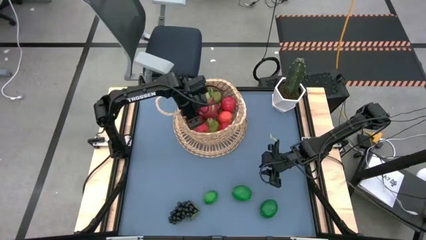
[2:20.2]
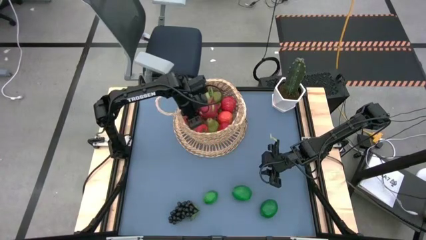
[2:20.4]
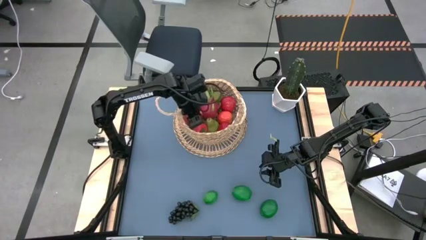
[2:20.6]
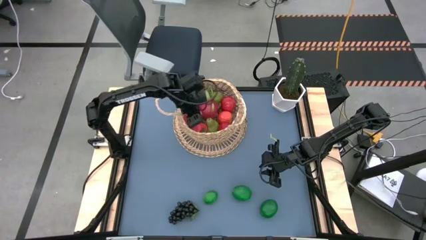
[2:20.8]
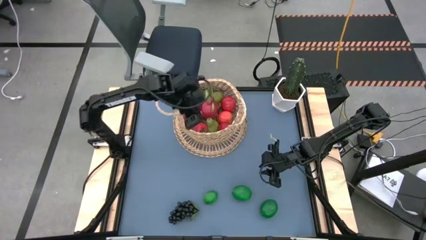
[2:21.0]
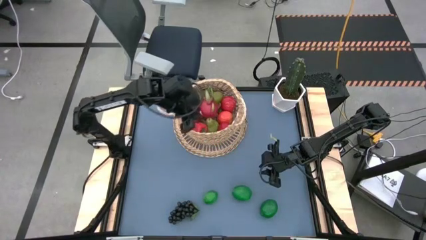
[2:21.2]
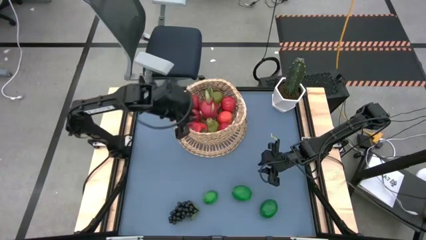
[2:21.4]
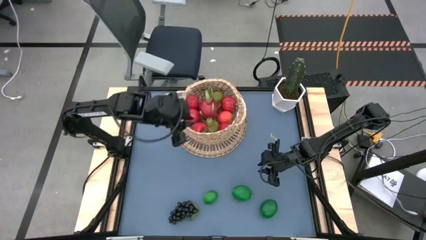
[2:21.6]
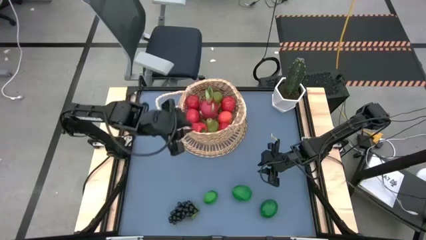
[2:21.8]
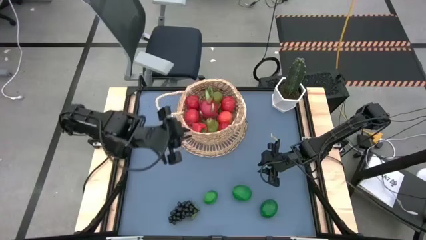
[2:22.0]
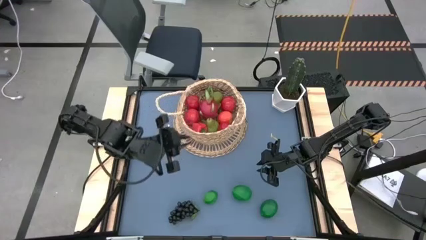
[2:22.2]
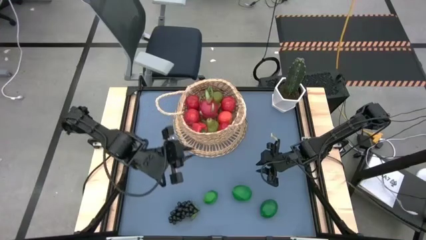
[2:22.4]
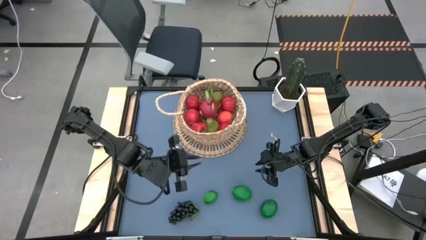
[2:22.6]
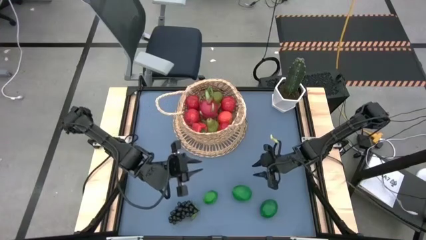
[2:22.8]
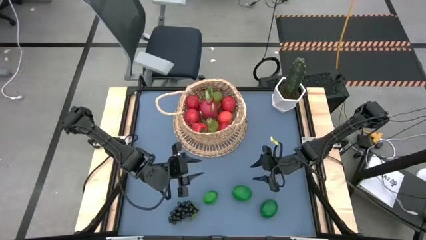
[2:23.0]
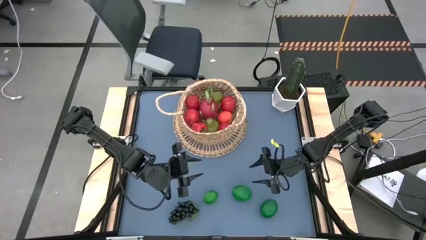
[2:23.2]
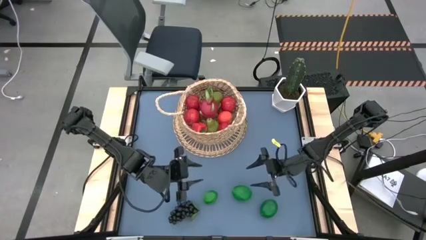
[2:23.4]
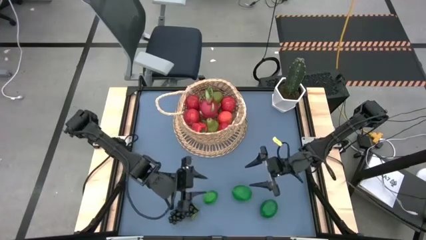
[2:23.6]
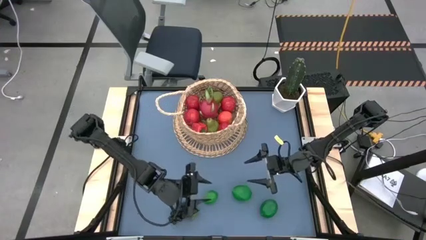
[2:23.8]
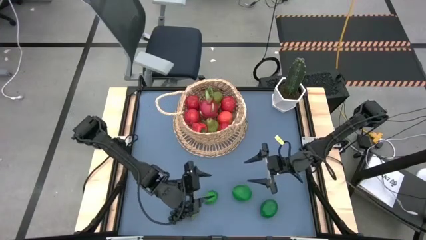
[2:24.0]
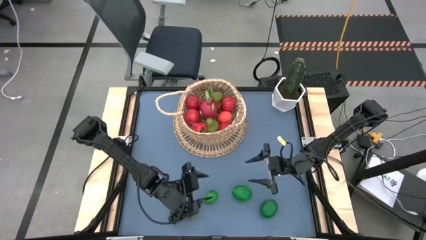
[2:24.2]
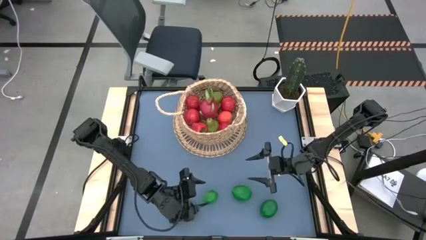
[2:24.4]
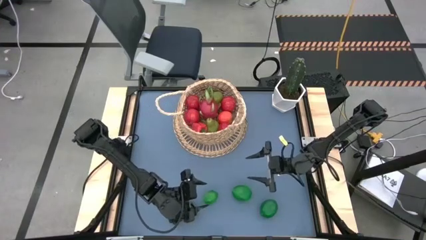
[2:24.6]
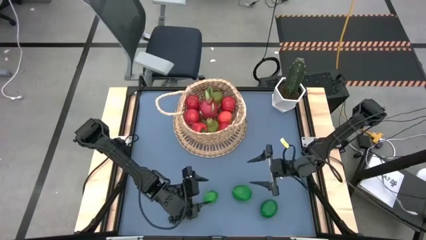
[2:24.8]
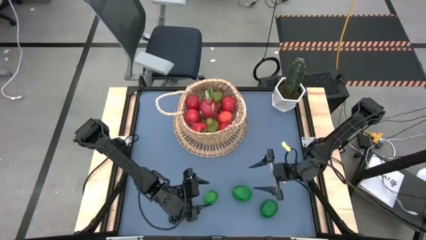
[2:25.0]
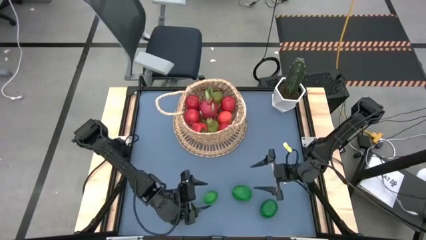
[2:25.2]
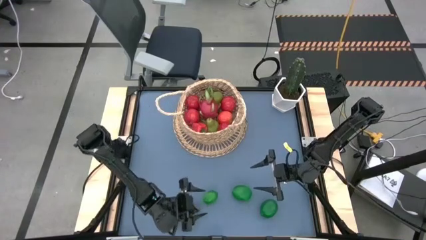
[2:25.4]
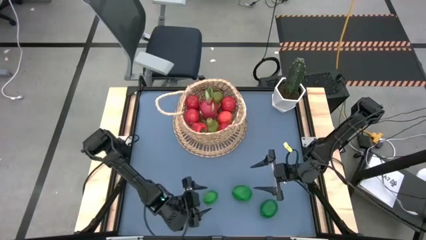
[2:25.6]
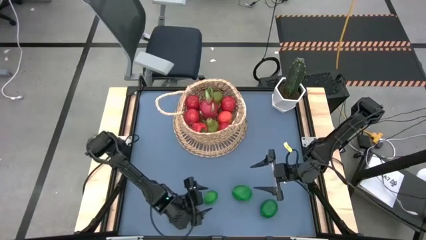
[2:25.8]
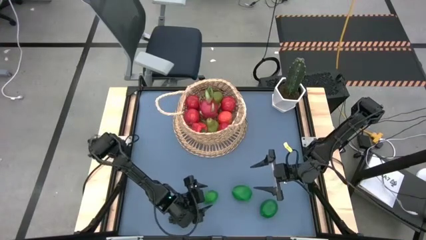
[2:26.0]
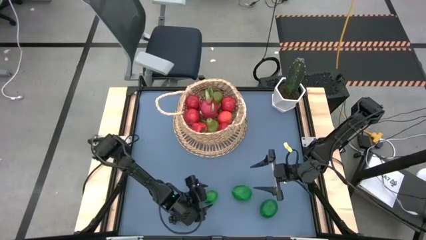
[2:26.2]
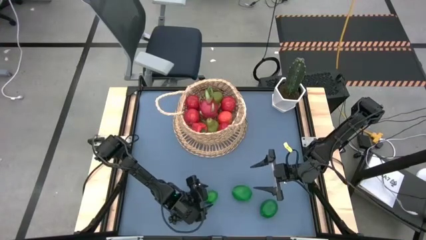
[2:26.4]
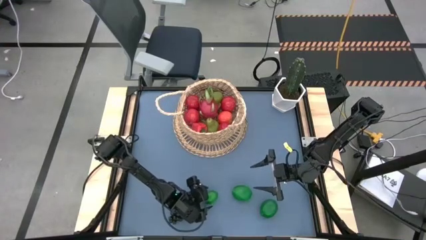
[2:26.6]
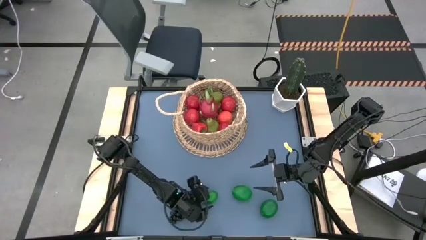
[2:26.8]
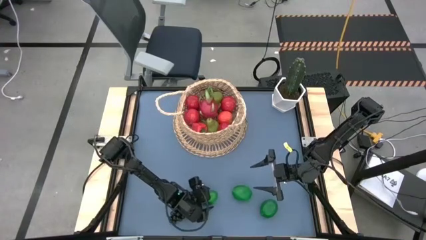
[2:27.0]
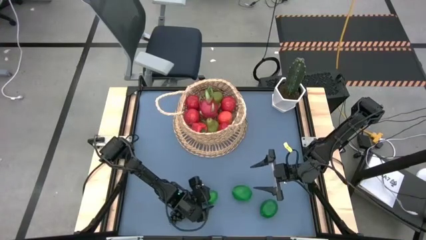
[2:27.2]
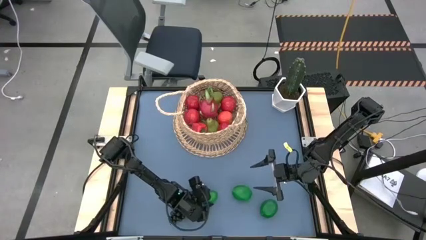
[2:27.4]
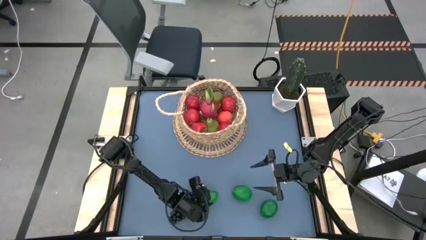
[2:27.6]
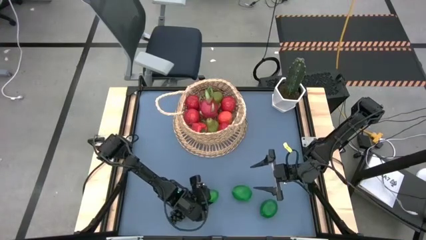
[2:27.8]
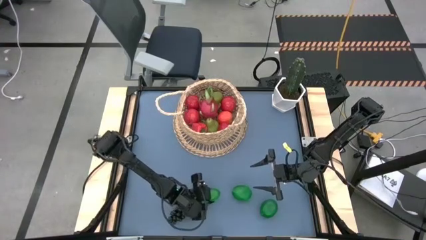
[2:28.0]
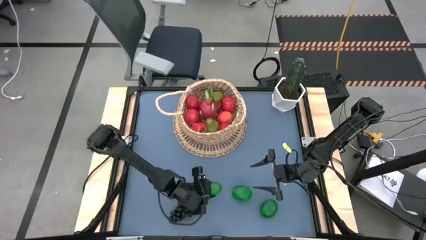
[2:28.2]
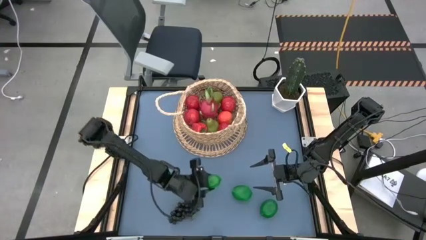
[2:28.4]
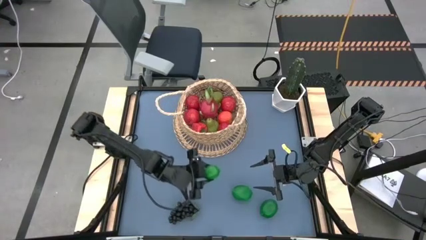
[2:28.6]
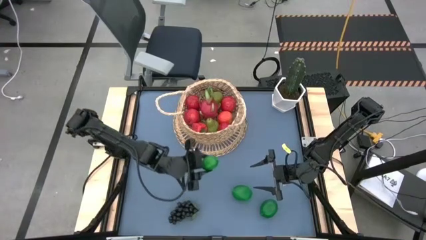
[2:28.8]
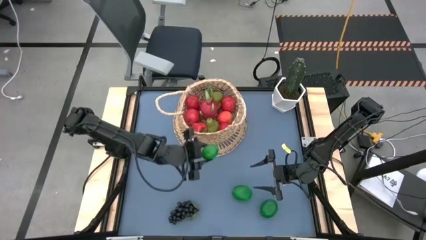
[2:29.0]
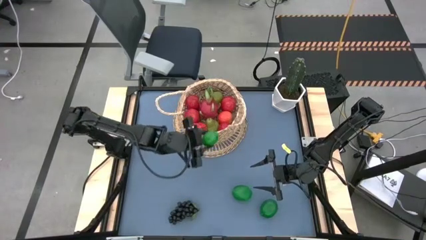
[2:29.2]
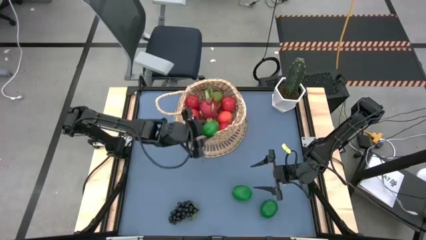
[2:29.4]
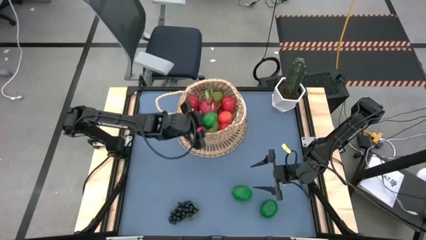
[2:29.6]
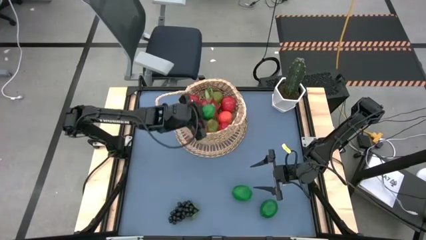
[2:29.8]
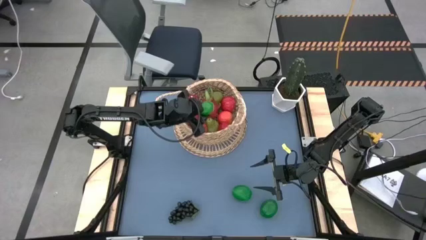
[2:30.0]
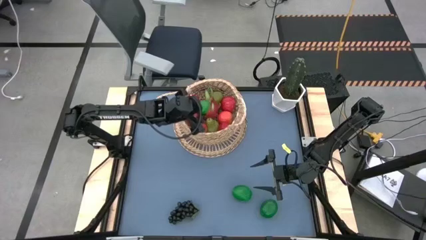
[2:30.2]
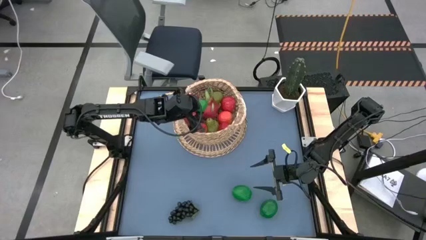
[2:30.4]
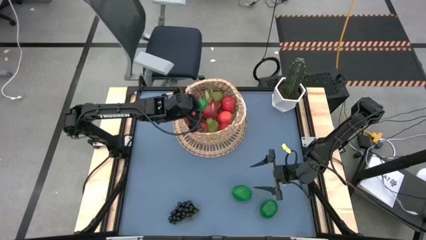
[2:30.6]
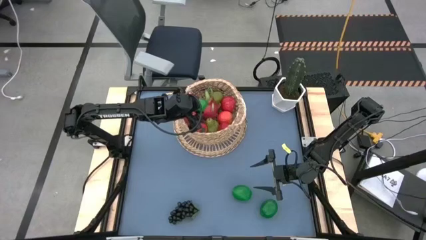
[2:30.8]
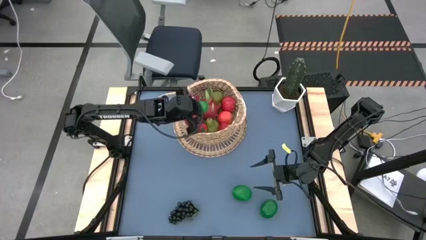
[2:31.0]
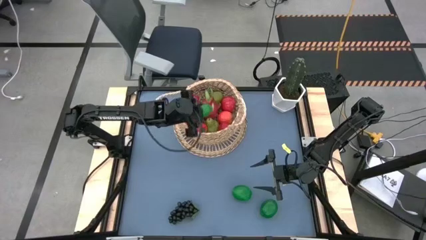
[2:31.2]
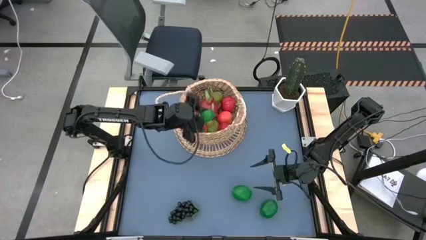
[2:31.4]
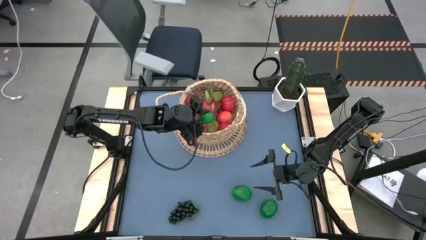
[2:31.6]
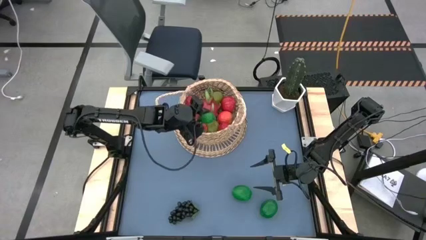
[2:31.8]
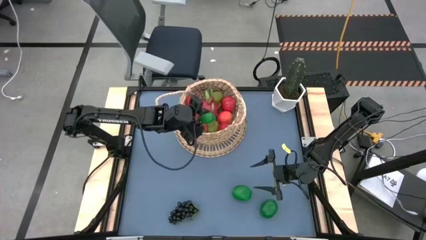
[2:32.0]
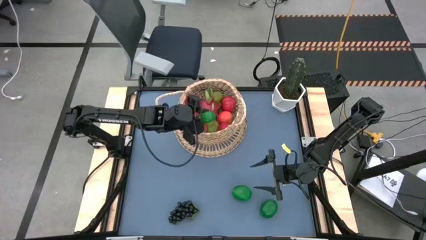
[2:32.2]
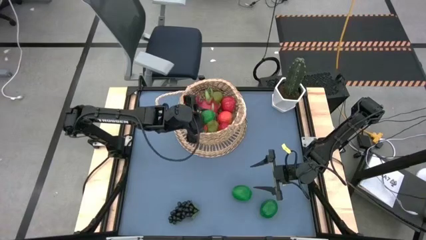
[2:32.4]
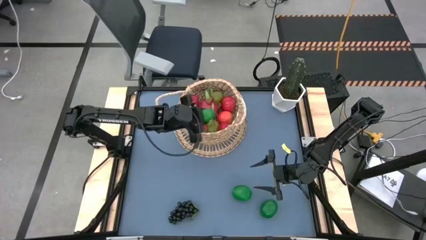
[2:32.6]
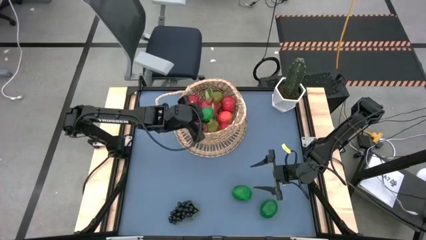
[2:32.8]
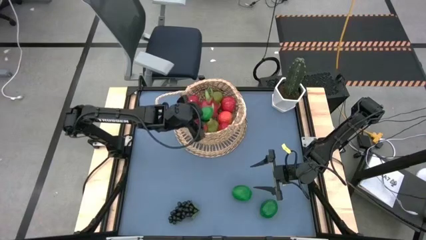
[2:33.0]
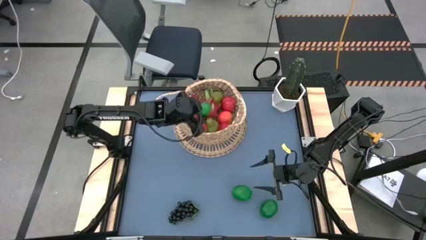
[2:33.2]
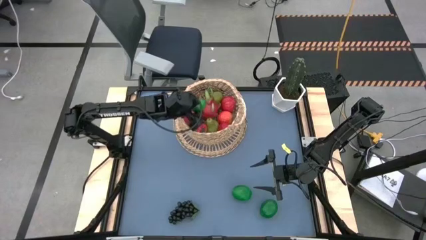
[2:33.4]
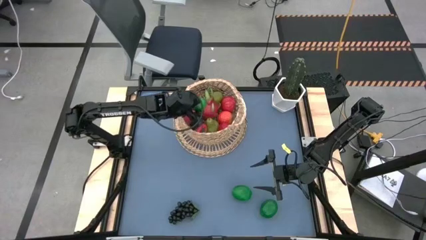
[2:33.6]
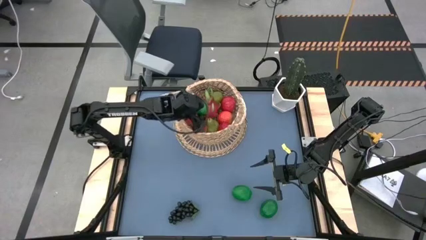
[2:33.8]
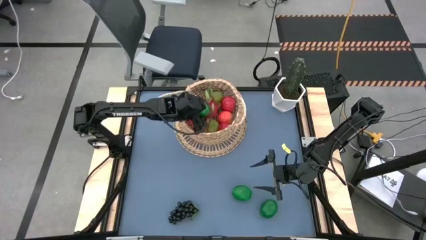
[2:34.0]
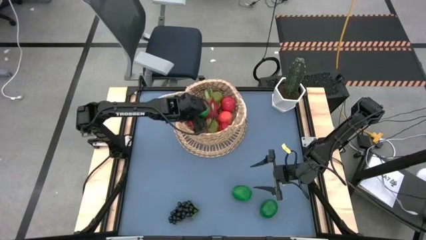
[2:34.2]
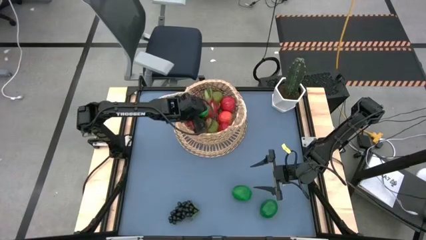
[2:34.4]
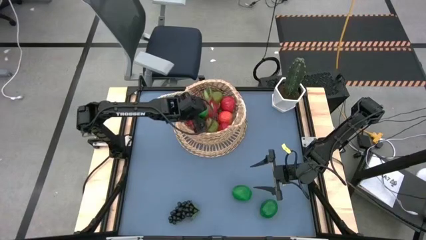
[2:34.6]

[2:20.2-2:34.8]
Task: Build produce basket
Put the lime into the basket
